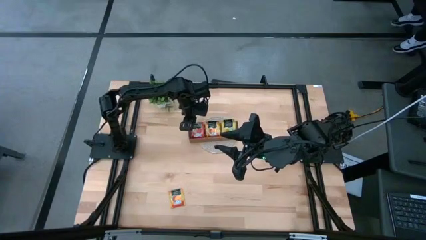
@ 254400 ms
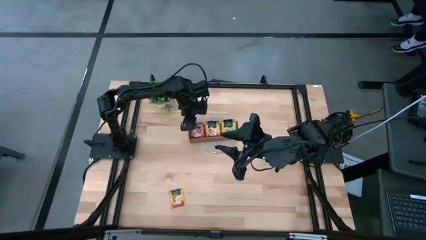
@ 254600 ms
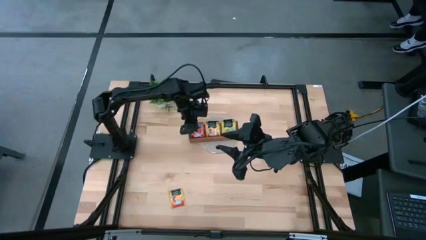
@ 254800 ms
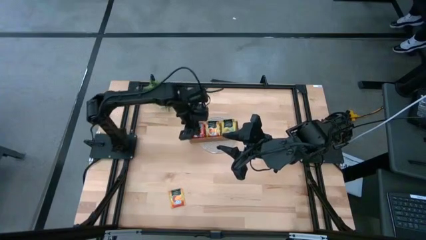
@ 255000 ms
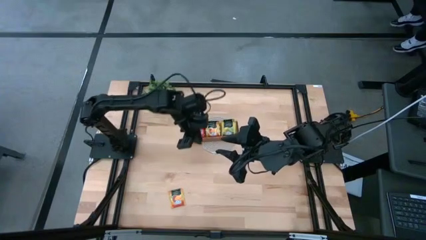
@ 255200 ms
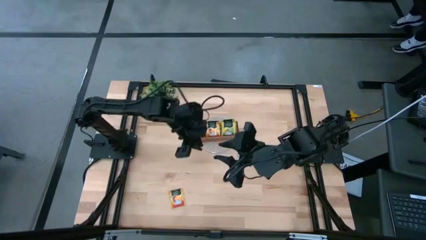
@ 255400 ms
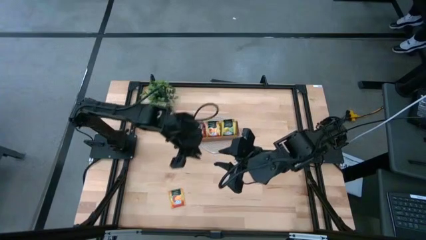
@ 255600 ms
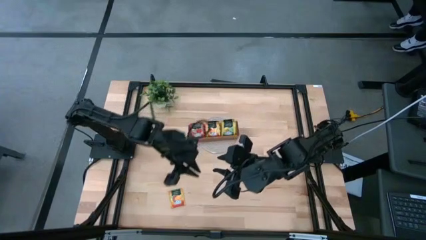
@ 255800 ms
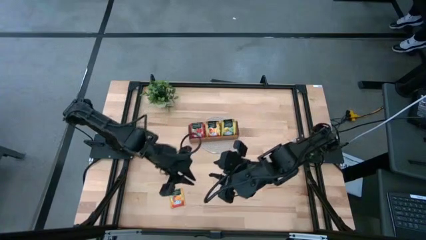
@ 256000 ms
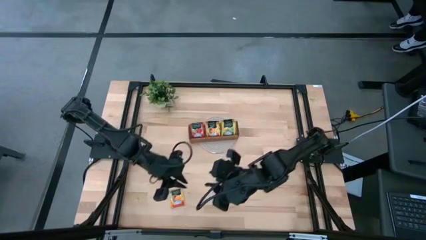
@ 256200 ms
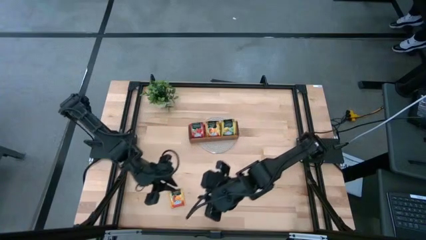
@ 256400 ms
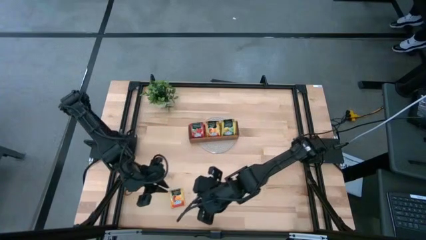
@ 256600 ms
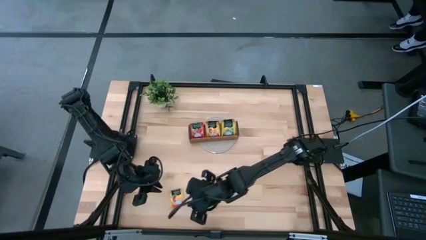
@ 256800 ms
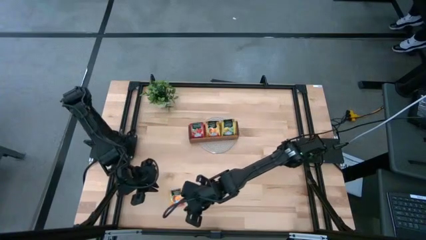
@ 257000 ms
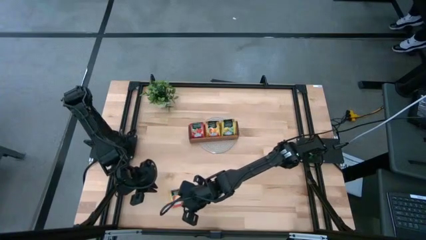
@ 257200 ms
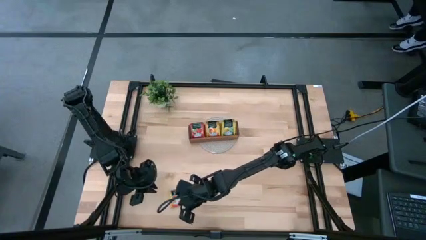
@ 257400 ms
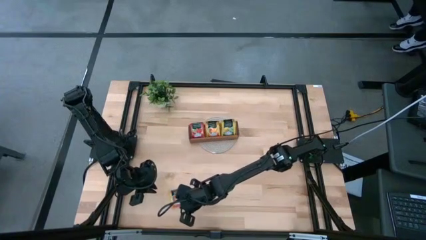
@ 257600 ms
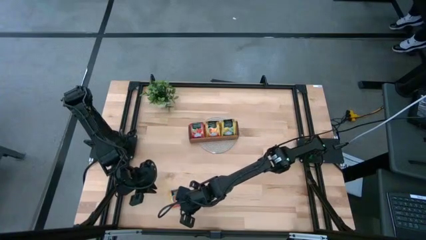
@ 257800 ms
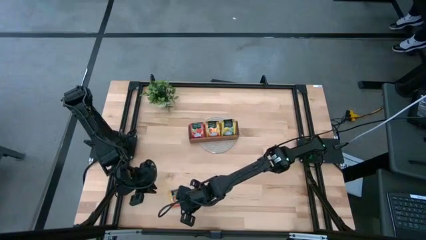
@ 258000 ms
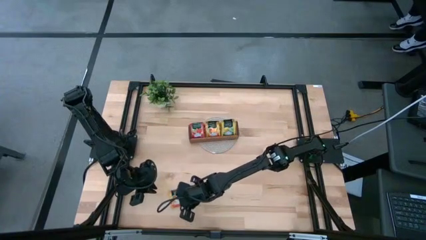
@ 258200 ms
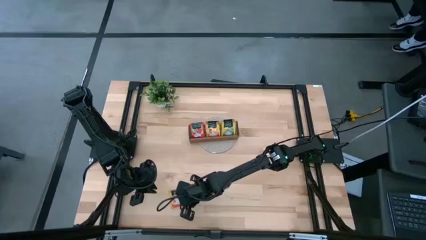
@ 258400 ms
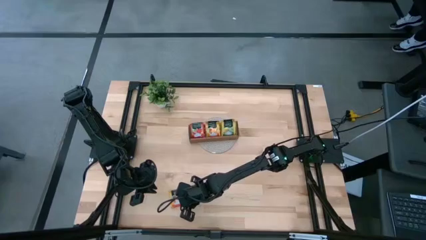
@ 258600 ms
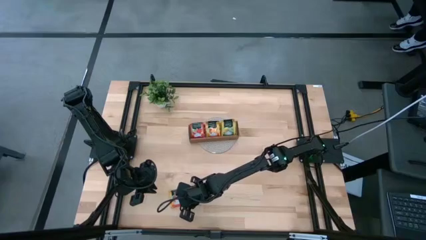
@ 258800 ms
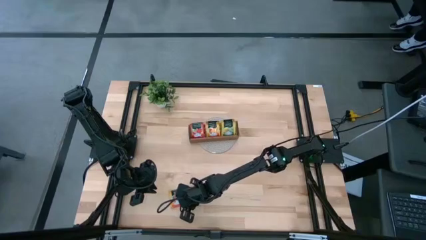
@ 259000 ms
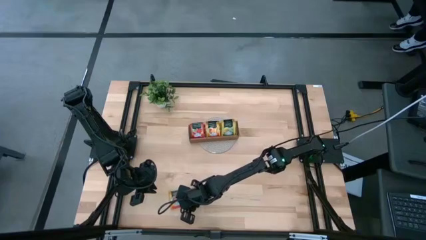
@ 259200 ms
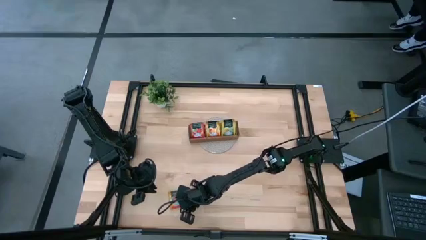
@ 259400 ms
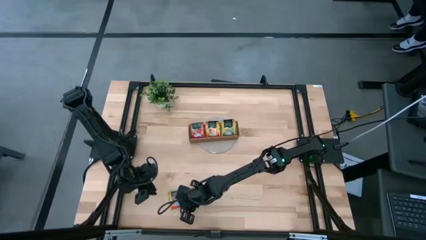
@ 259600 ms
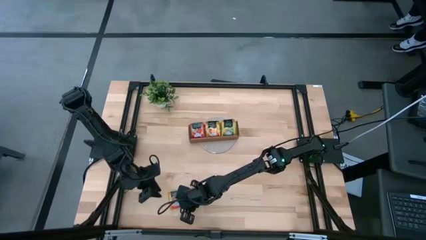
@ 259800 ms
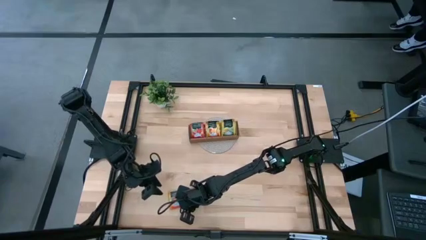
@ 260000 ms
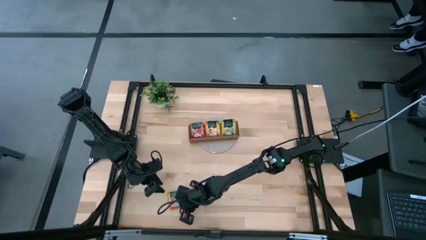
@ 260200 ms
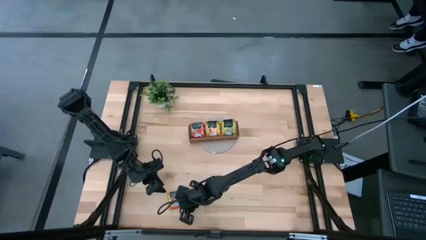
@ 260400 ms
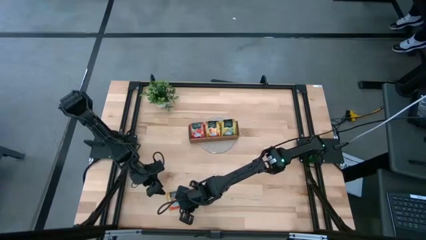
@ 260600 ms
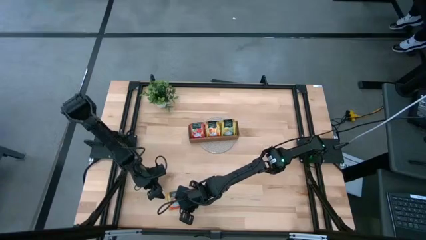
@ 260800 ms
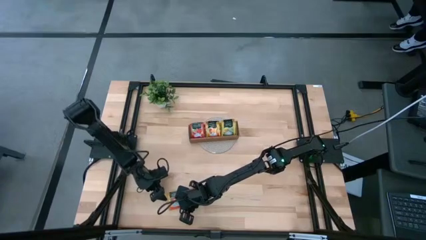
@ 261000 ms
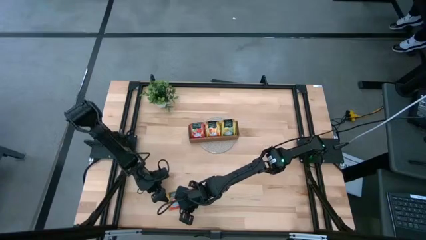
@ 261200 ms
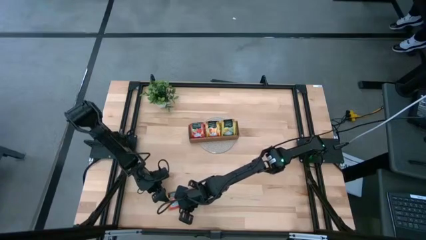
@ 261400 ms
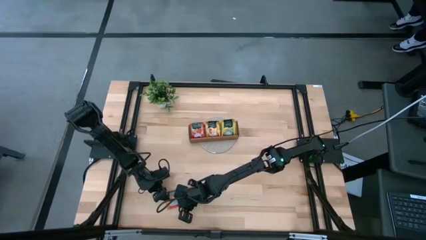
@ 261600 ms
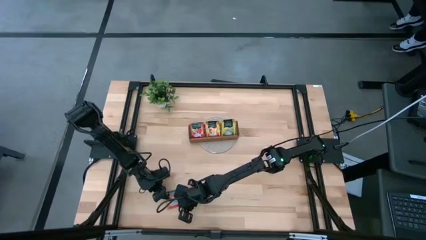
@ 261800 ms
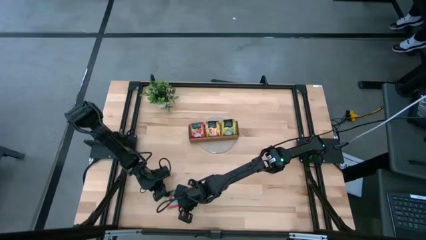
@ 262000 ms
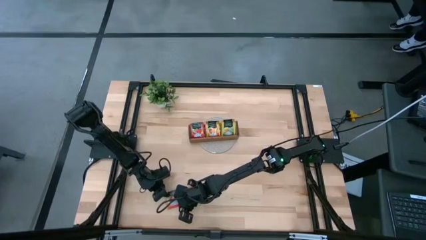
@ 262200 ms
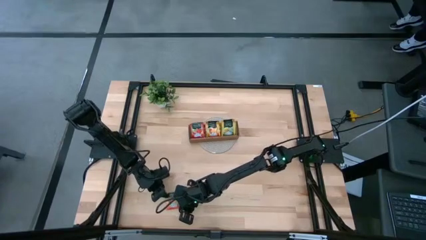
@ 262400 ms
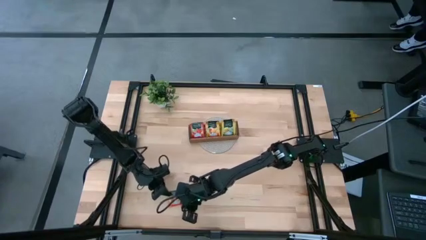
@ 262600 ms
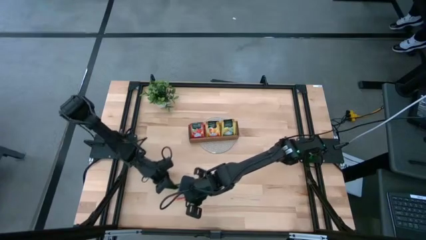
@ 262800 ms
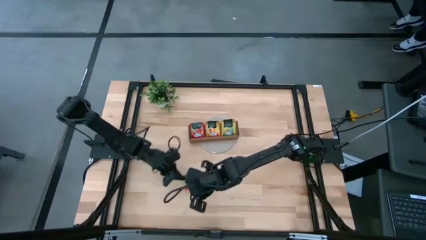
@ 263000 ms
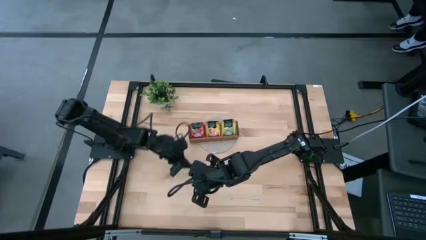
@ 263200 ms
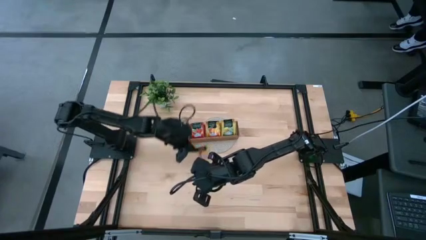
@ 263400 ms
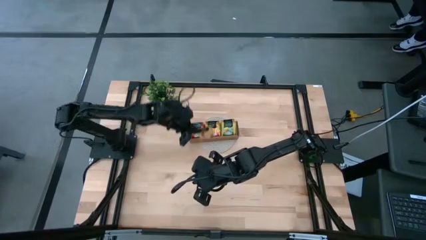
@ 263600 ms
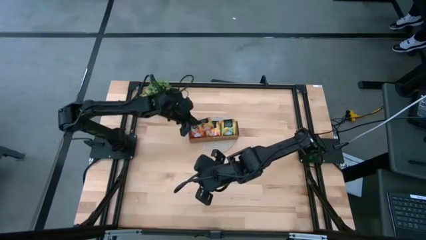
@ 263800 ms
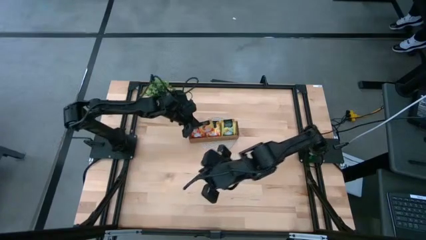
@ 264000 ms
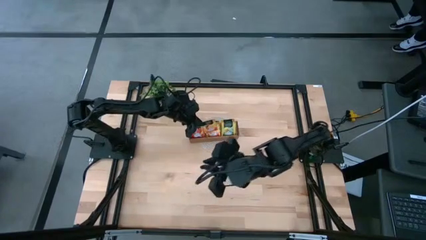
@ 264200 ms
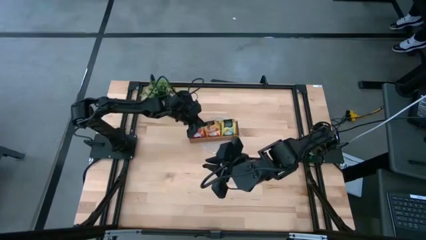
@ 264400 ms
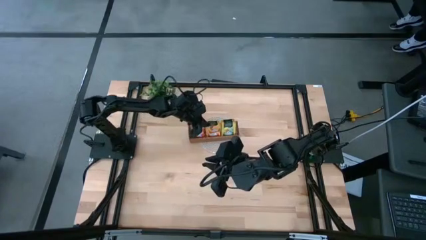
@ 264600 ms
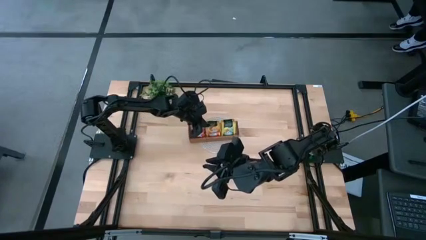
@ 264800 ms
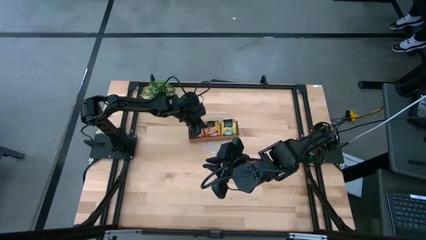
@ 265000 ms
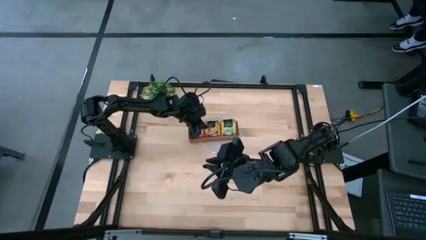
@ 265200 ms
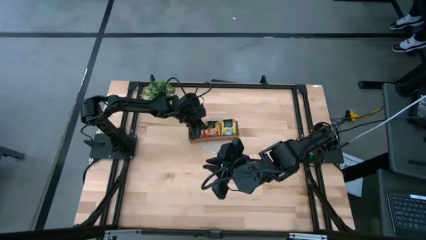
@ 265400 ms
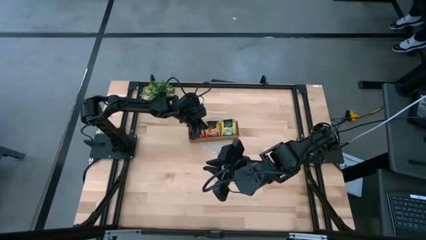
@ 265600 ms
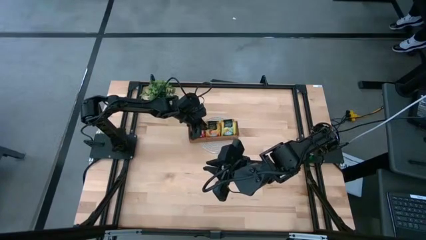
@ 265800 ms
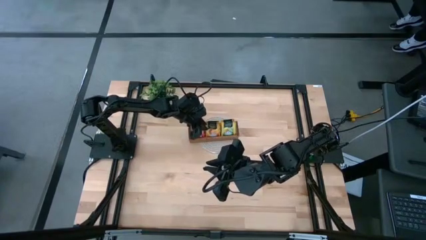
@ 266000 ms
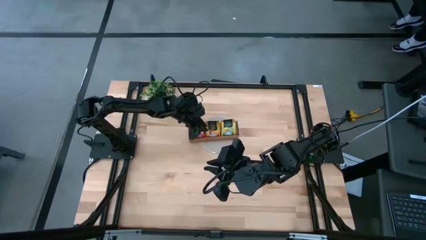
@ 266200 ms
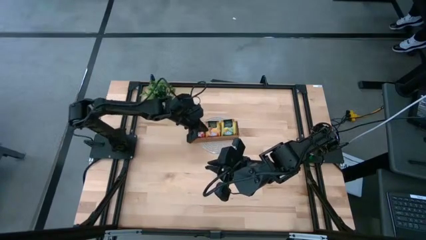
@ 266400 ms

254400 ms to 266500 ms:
Task: Pick & Place Tea
Put the orange tea bag into the middle section of the wooden organizer

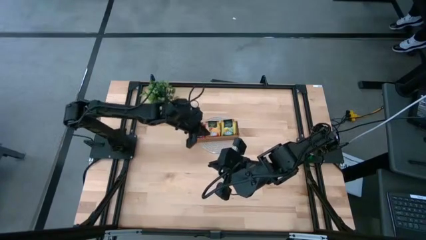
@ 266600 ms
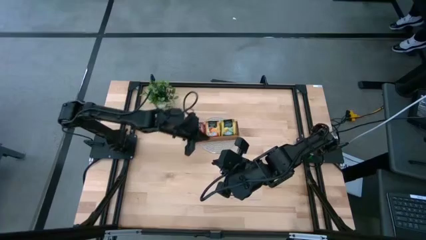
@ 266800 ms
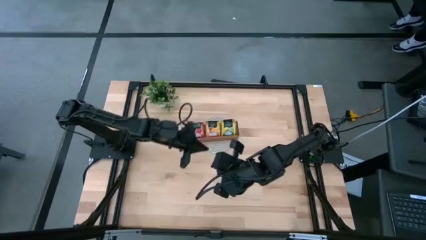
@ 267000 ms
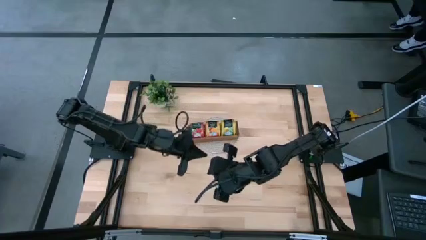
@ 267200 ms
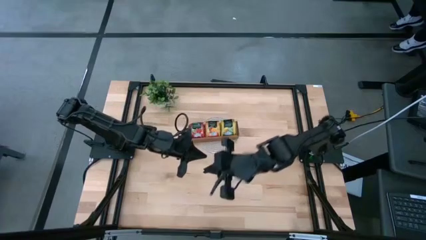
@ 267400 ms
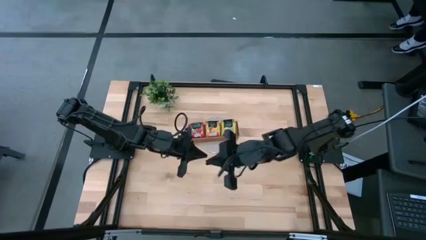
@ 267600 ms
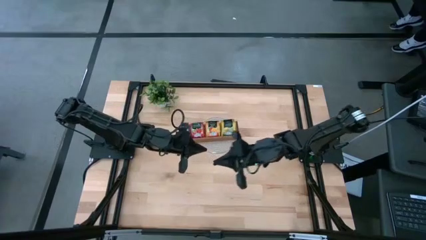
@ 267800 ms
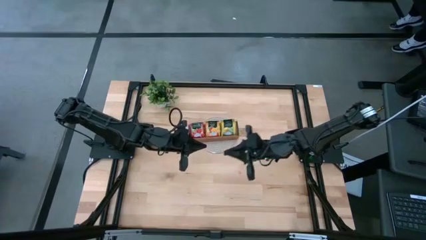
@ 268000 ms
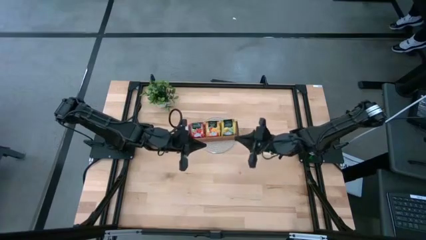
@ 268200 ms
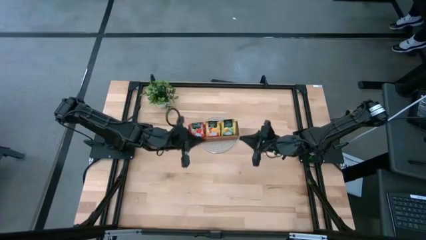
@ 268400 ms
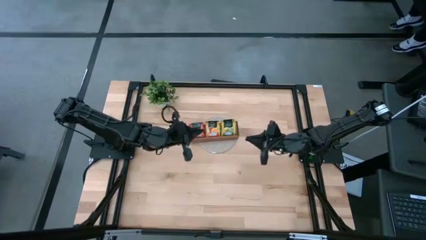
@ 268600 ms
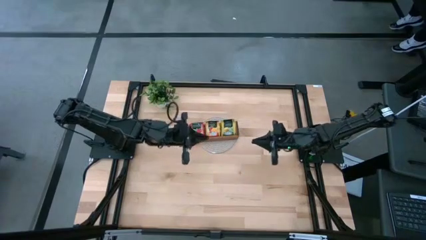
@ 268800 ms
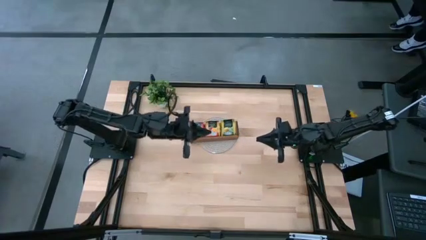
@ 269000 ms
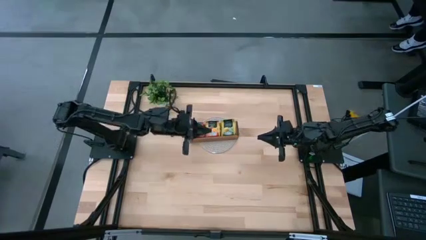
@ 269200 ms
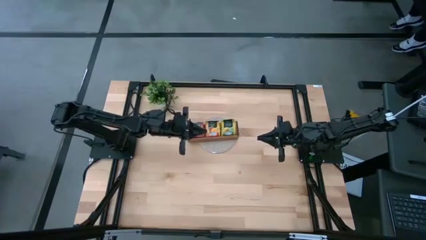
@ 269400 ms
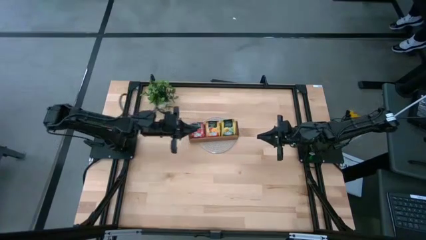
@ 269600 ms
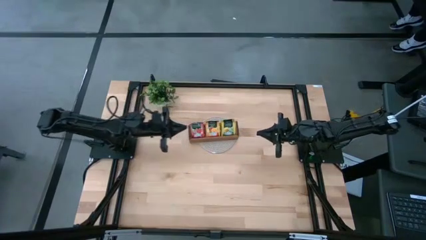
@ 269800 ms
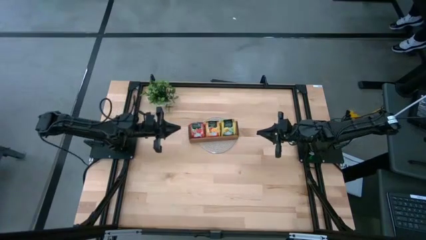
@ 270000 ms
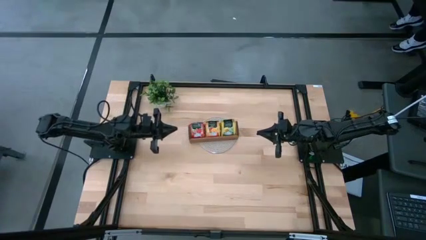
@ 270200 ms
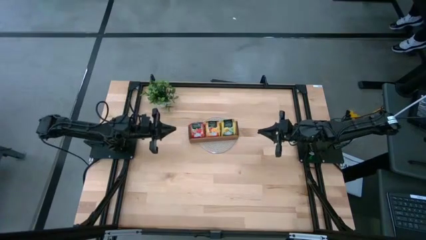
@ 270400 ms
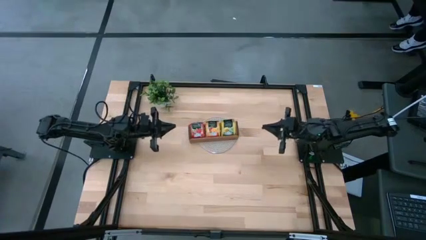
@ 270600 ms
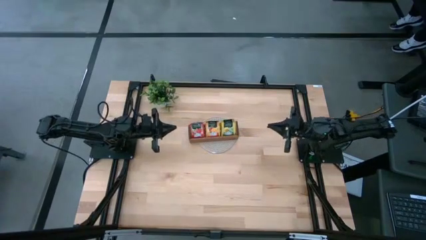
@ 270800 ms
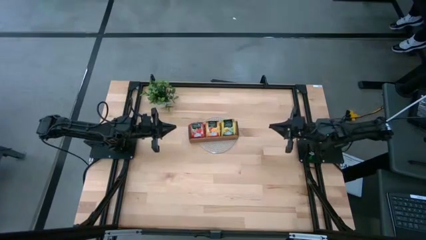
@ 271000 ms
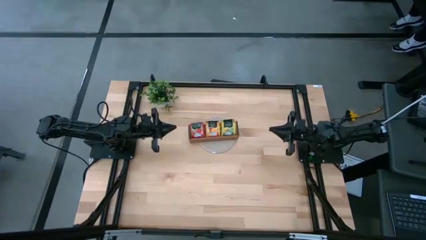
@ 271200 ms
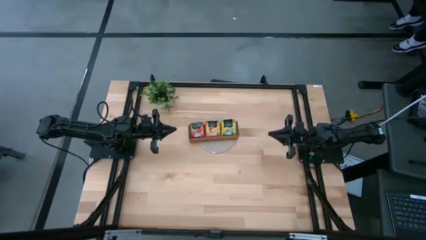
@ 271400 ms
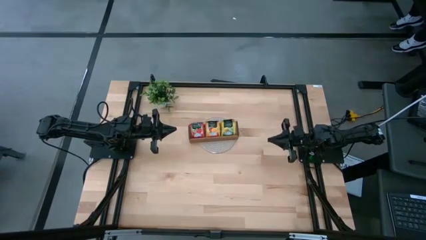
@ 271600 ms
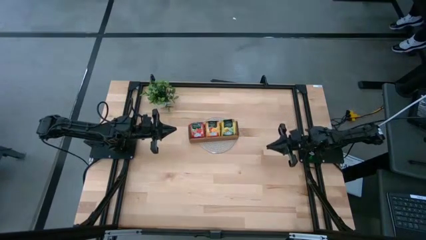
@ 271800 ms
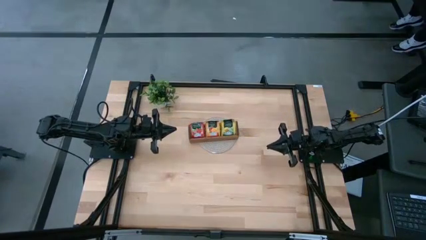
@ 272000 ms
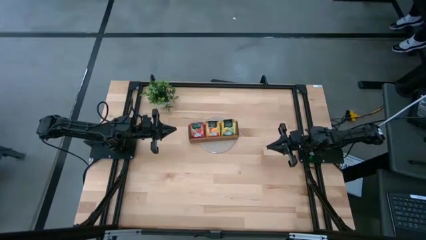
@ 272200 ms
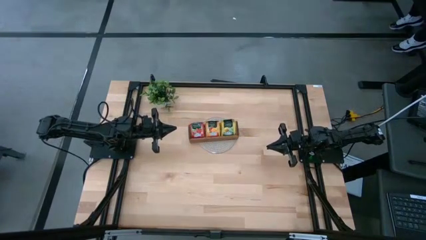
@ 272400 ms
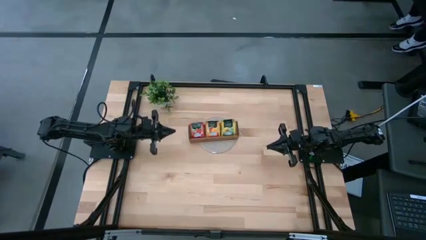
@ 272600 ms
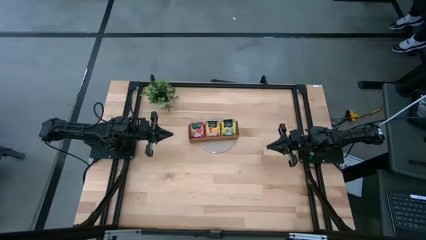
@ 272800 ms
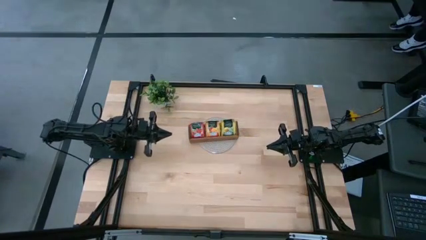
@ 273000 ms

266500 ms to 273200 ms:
Return to Home Position
